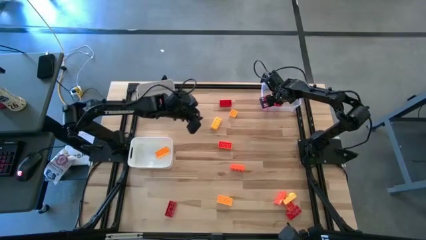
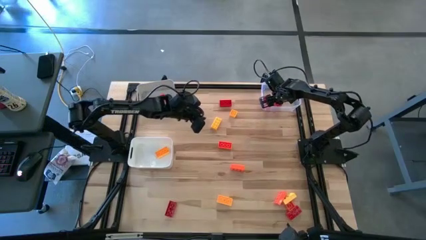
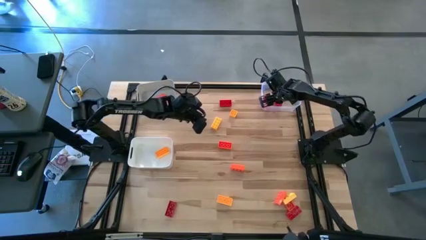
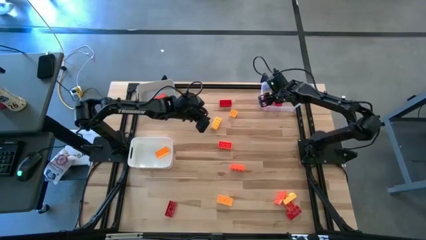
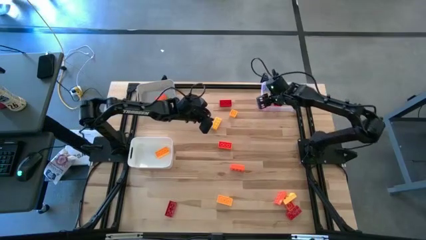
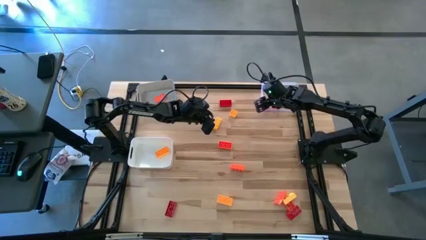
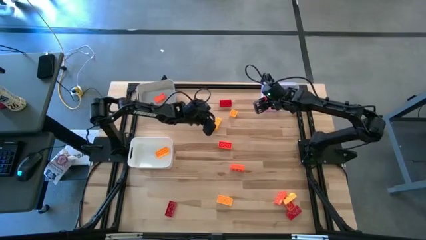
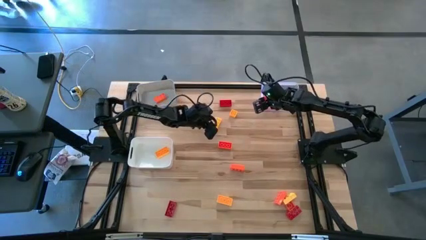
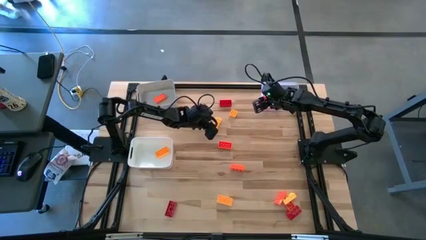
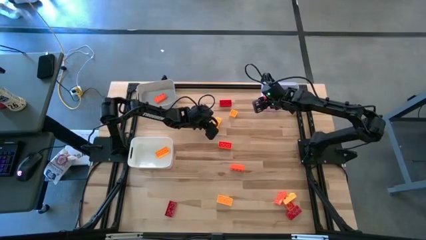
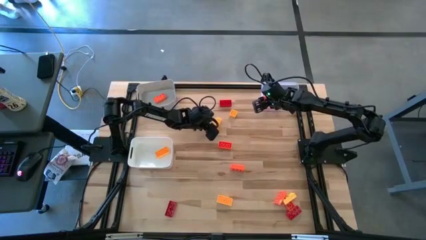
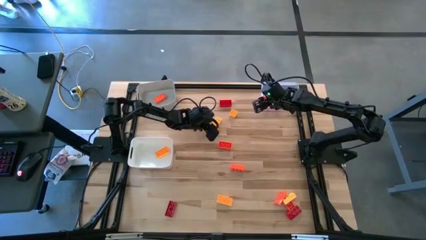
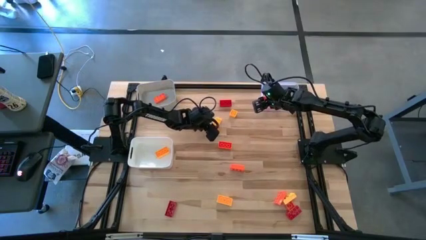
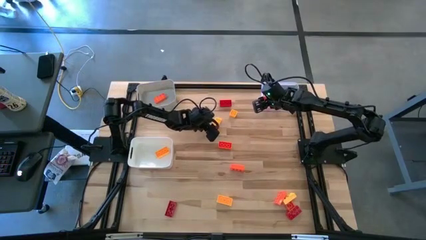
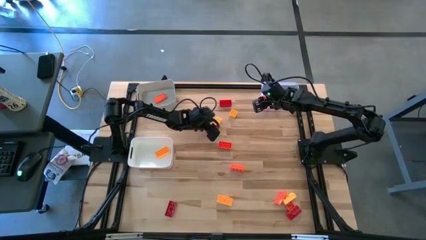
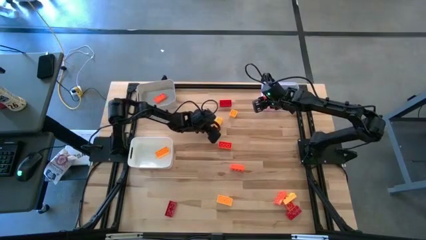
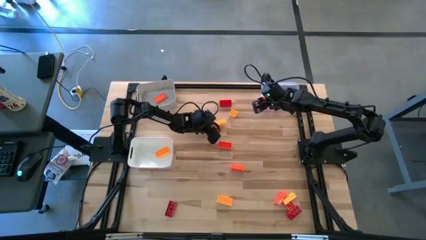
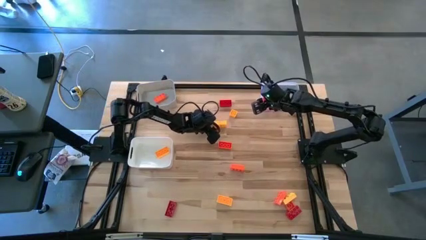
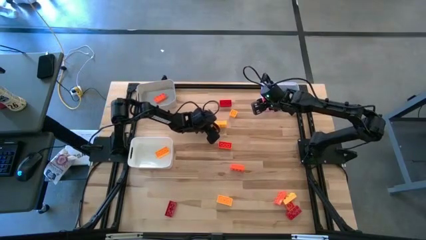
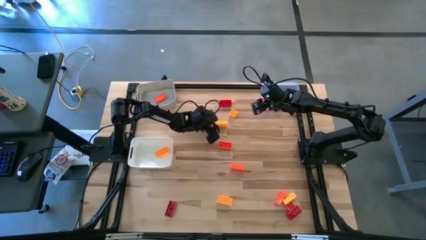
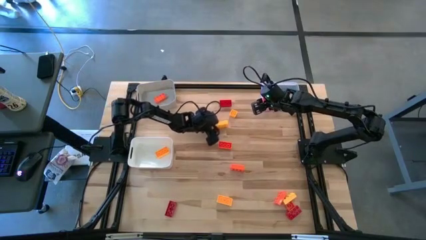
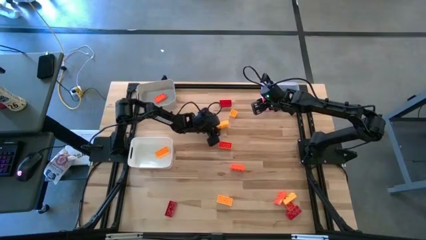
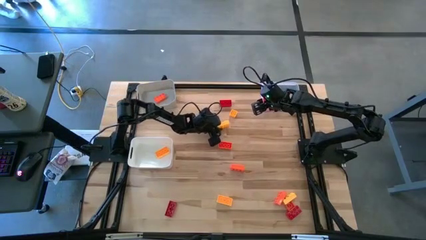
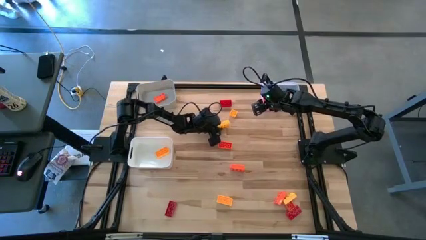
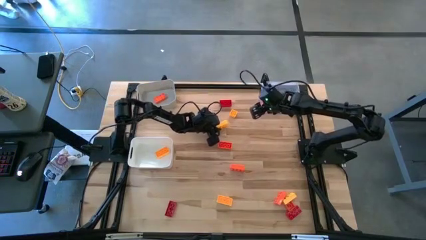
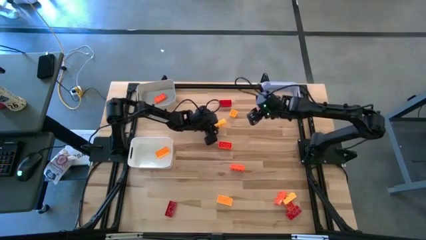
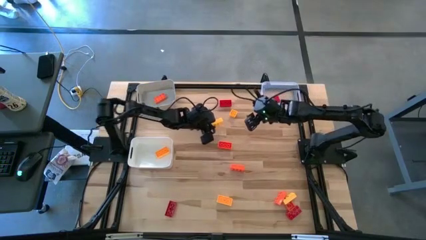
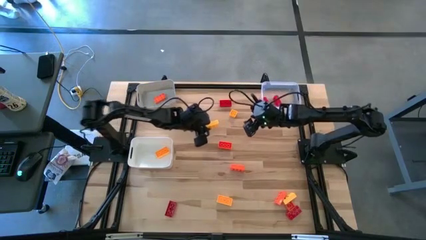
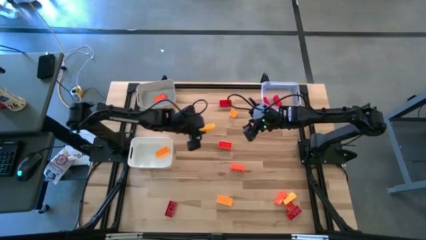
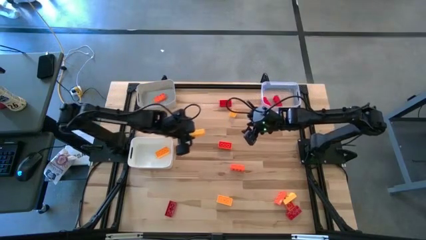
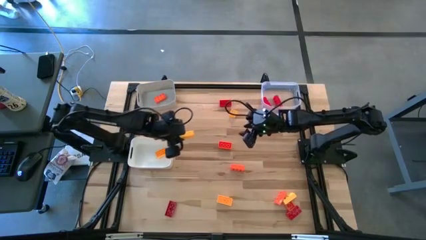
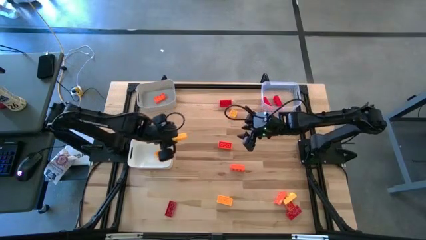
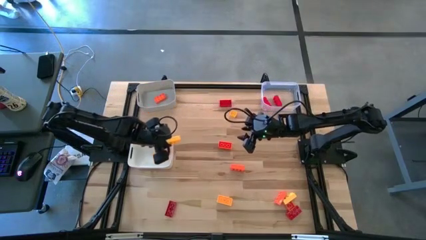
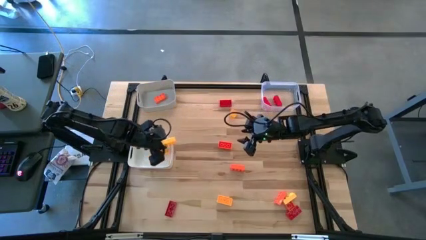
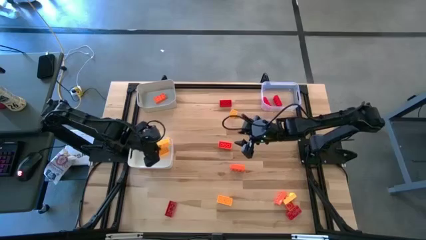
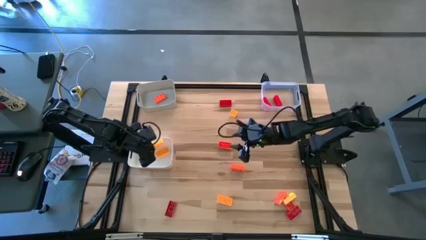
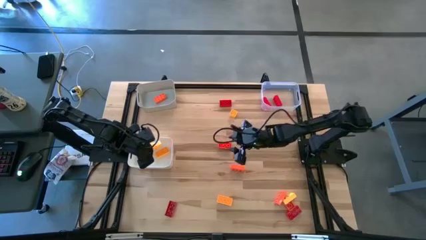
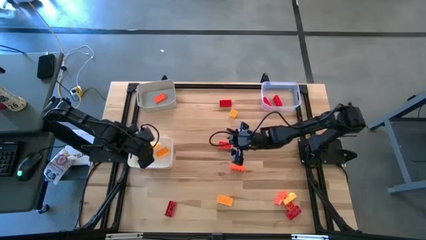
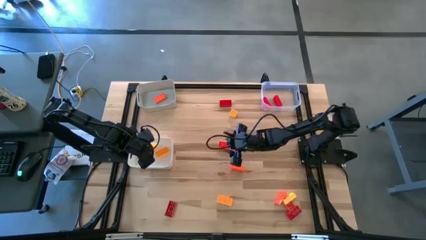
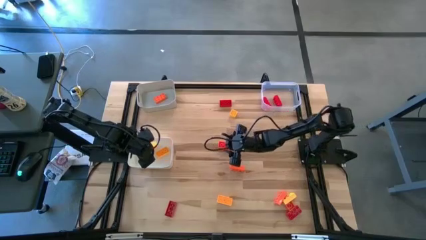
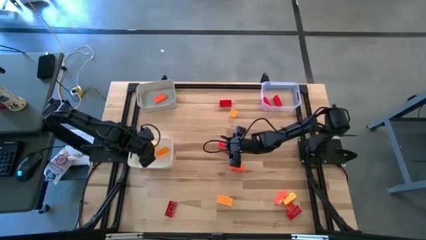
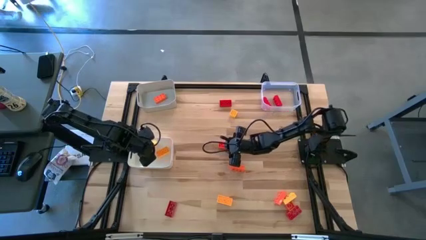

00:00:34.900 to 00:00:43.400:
Task: Sort & place blocks by color
Put the yellow game piece into the white bin

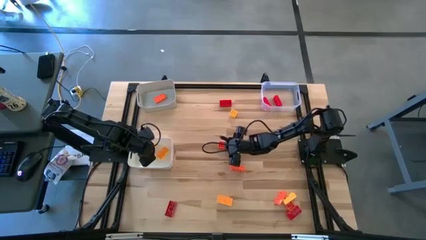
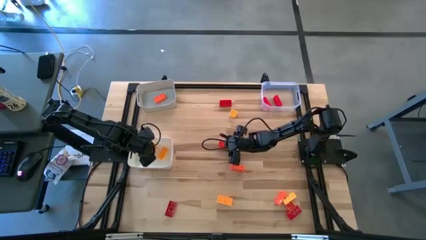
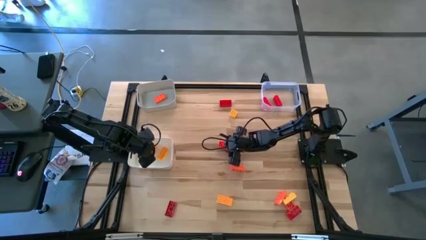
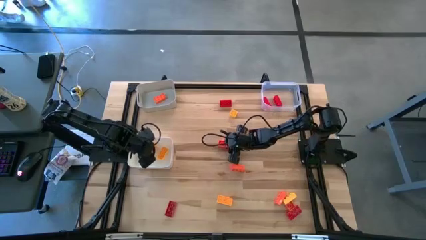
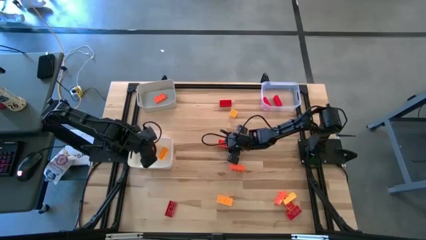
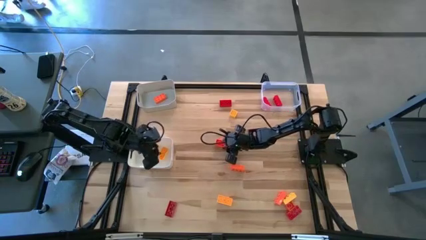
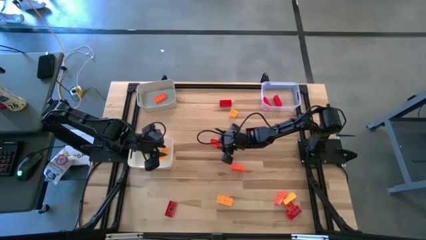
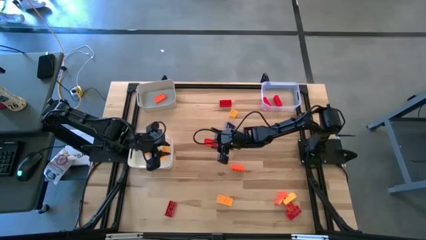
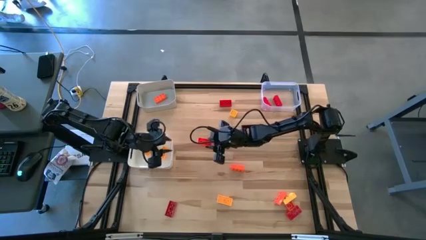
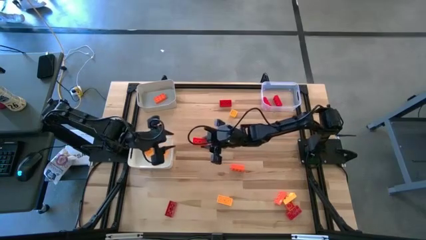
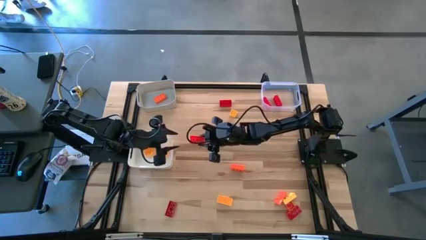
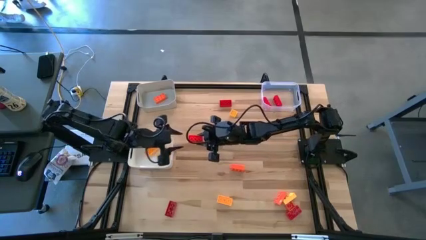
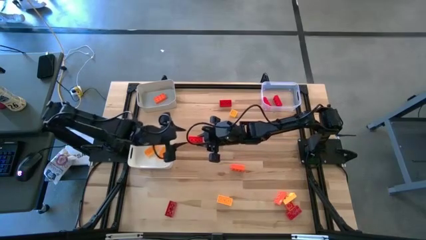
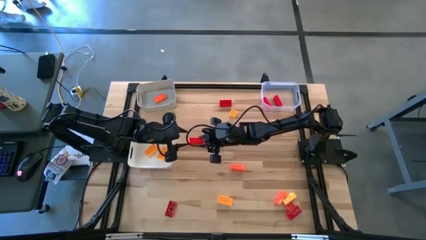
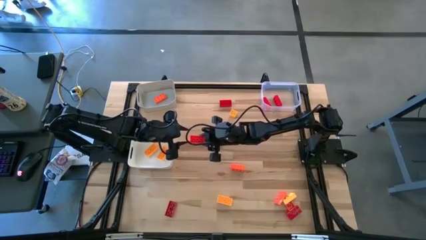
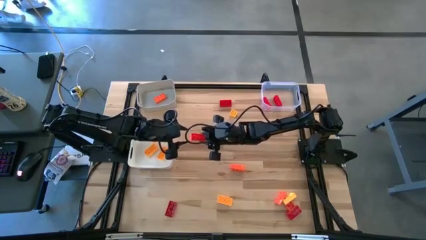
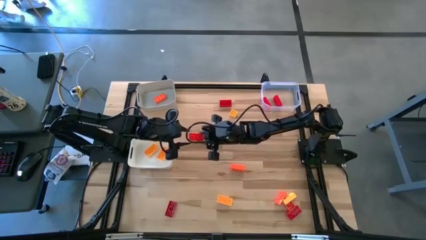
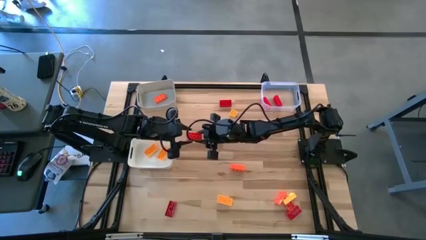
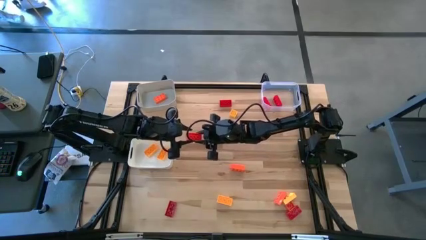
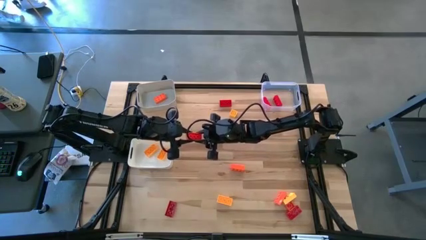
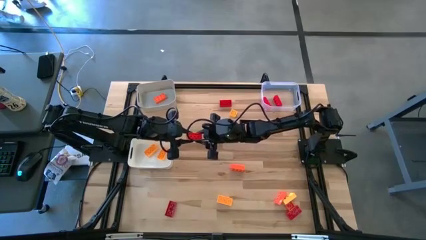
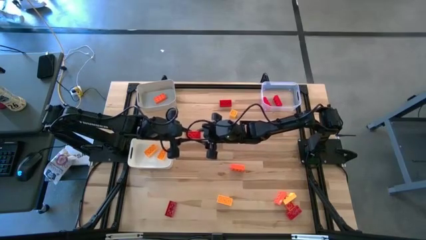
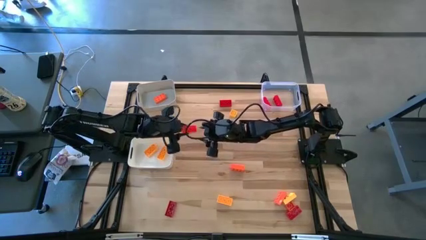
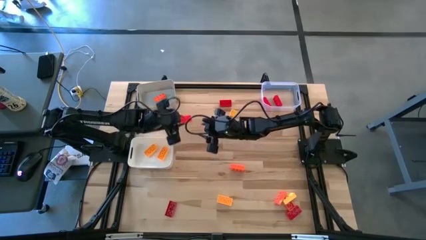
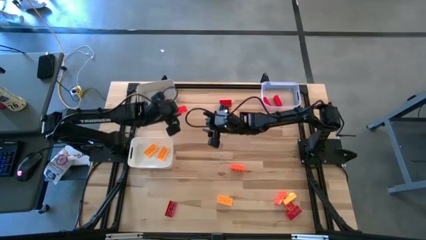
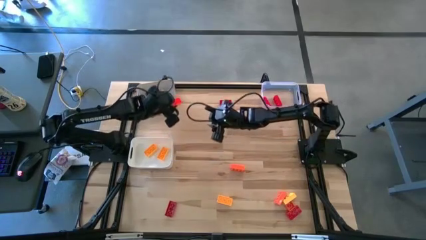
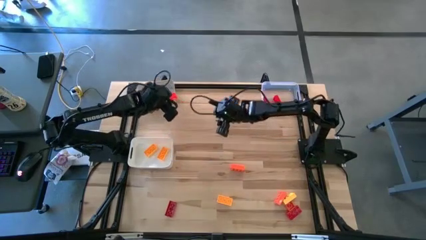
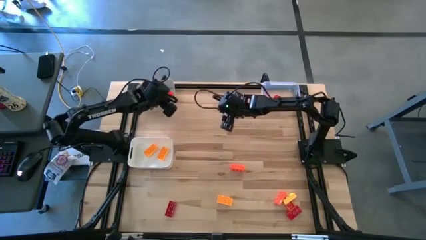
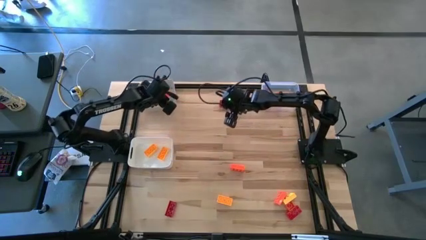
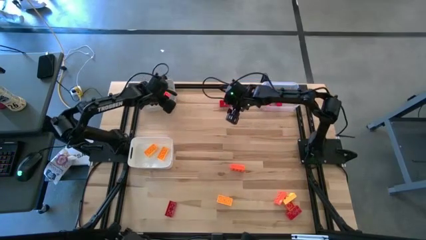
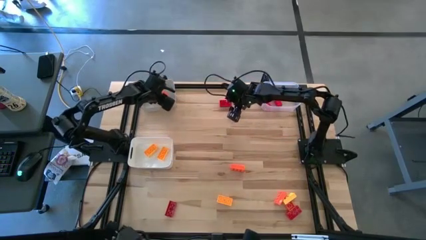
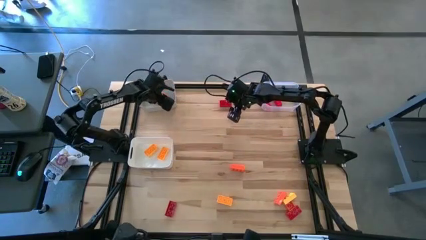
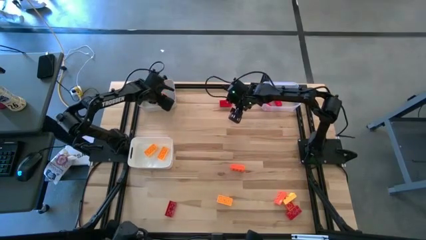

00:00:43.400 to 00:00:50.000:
Put the orange game piece into the gray bin

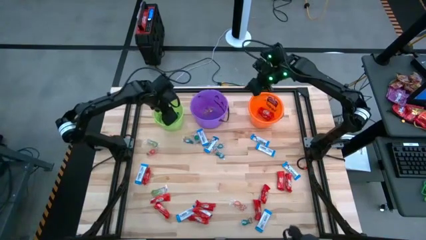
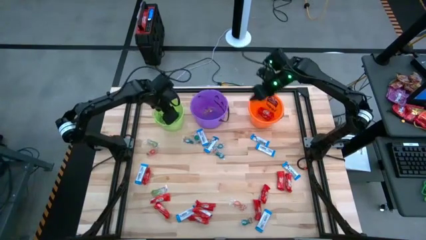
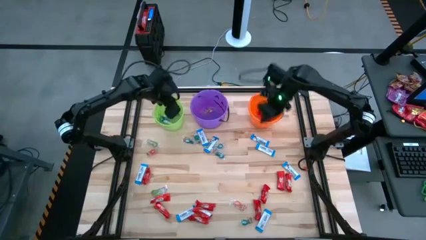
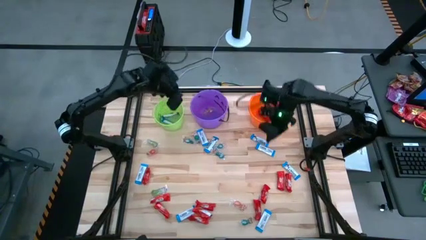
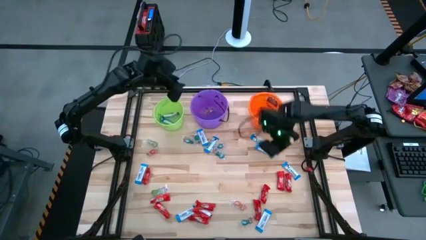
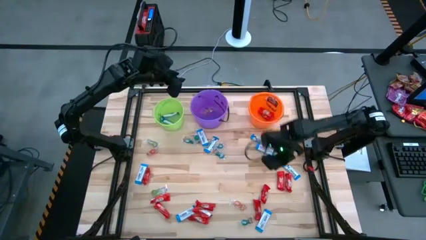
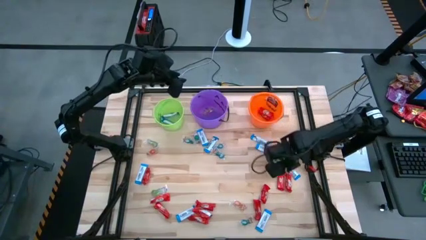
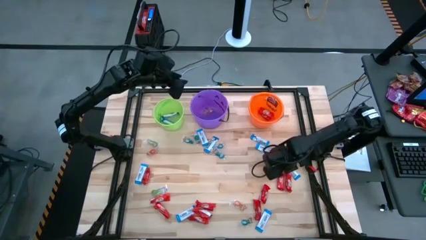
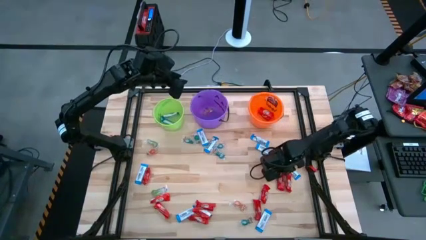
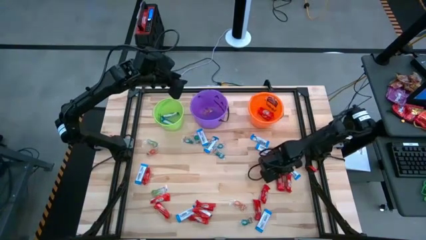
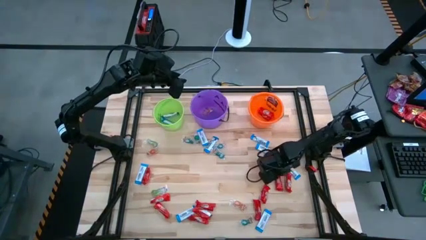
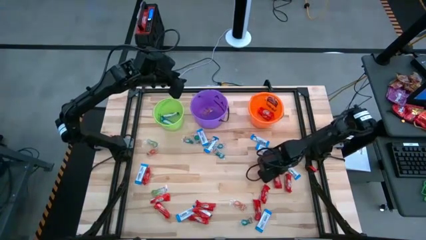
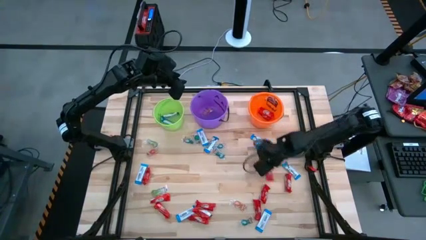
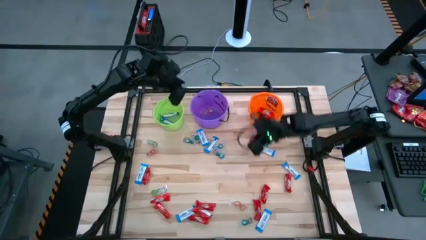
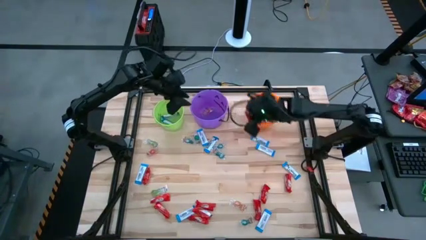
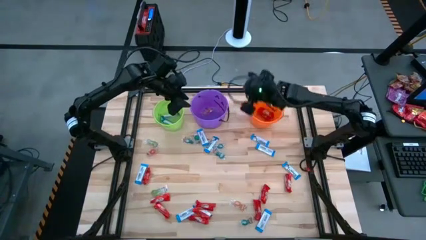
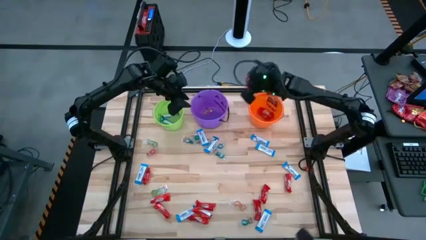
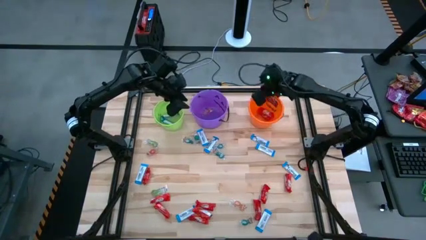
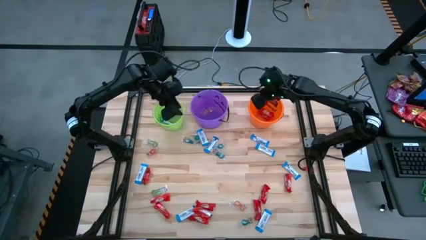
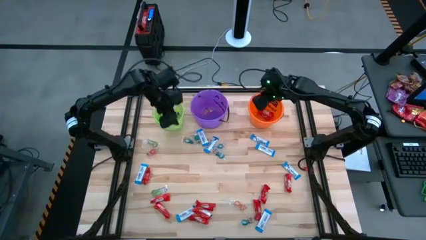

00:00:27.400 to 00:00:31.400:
Task: Sort candy by brand, put in halloween buckets
Put the red chocolate into the orange bucket
